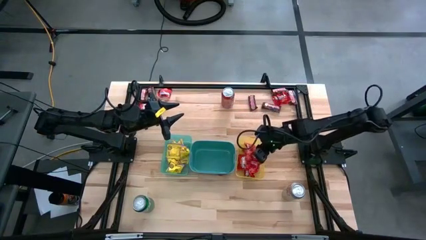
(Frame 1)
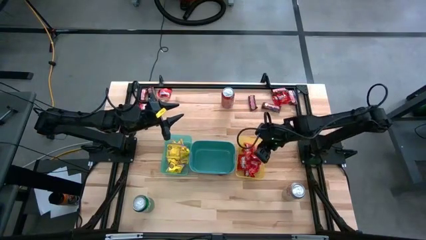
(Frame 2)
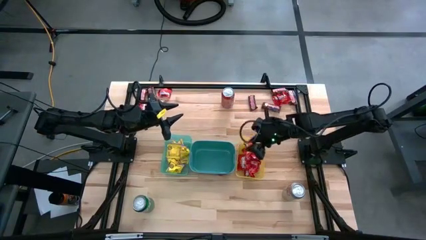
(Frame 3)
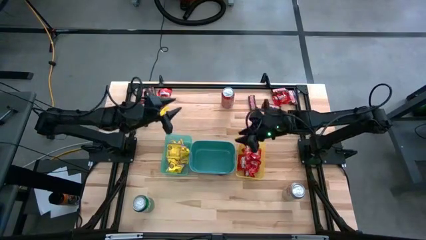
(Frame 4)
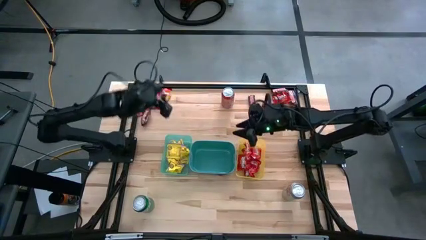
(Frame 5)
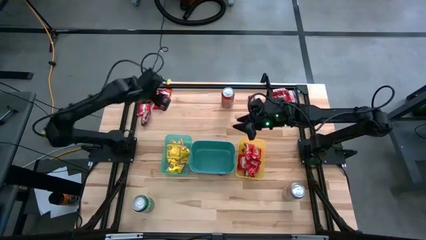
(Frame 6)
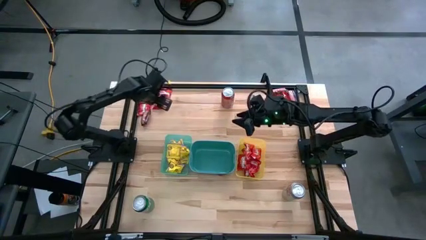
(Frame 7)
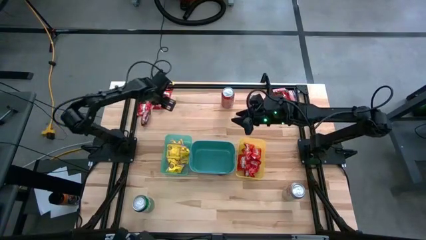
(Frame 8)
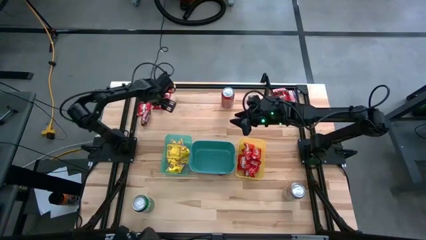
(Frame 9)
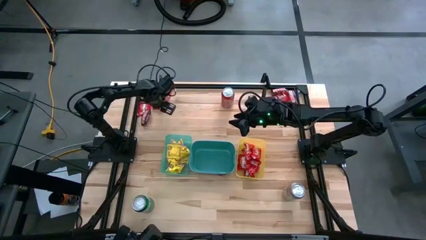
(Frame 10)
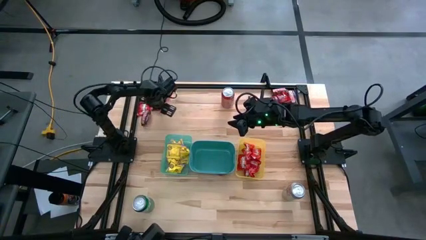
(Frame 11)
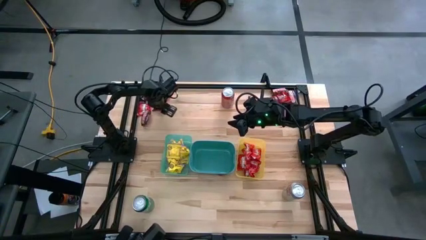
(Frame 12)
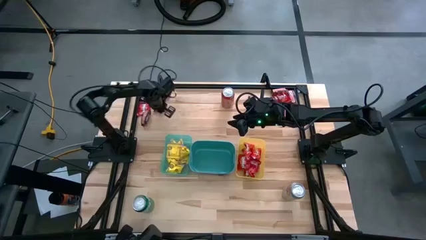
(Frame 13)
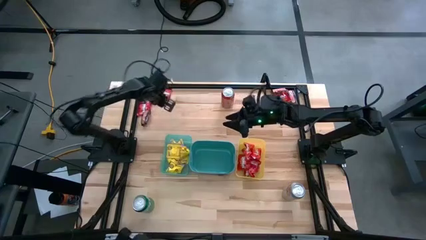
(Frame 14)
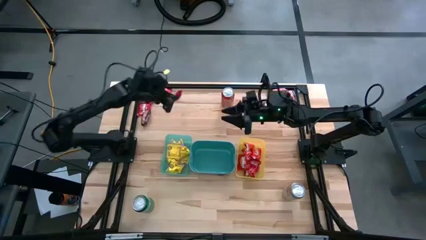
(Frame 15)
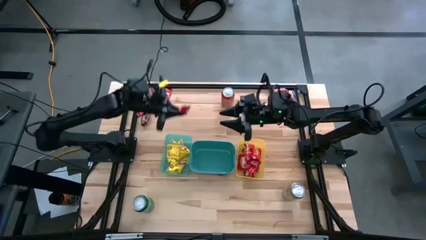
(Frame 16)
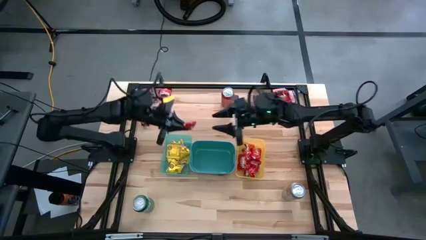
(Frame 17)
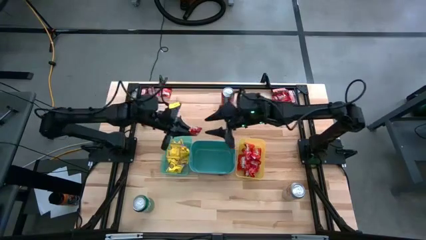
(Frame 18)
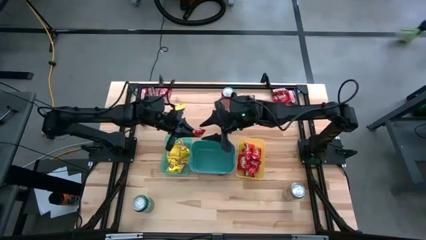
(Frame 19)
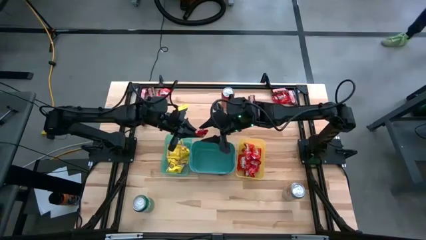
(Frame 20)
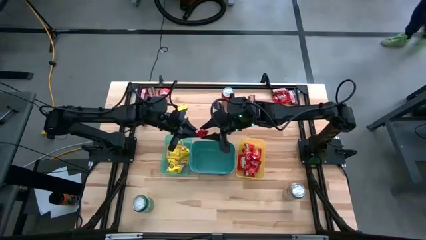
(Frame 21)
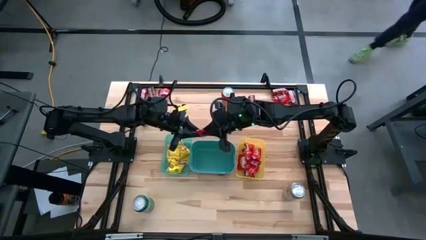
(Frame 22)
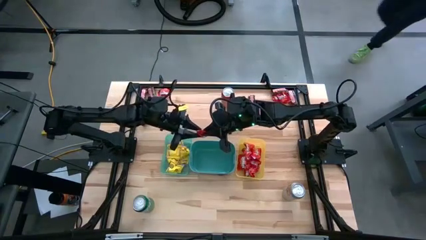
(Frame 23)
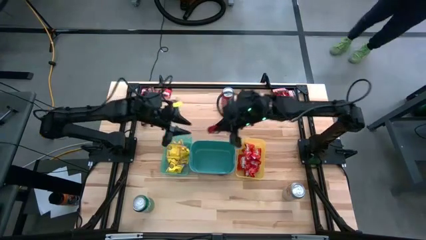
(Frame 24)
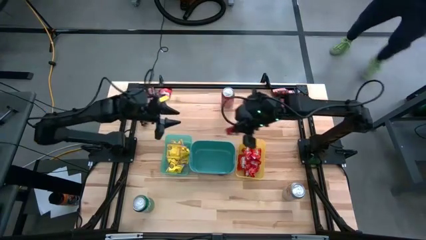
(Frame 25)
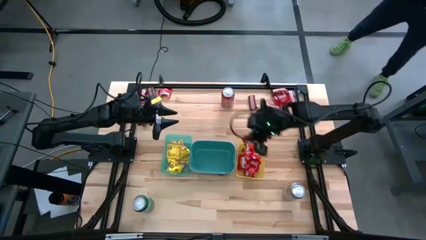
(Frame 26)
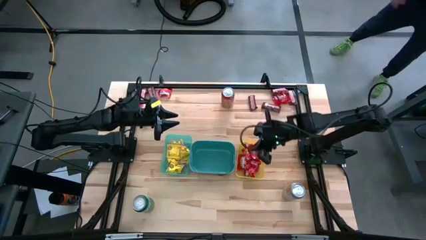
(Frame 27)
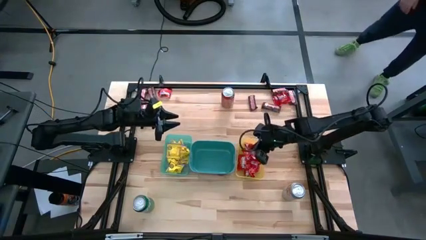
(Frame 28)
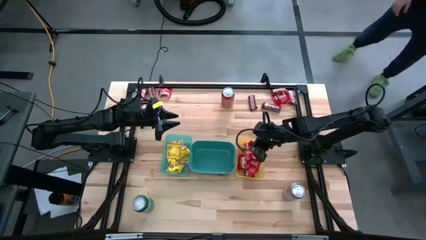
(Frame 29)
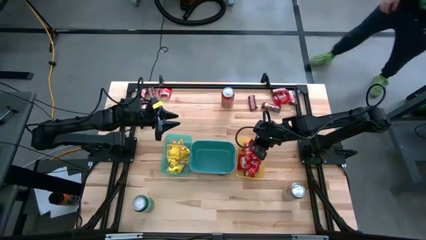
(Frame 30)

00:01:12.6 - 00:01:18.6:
Task: Sort candy
Put the red candy into the yellow bin

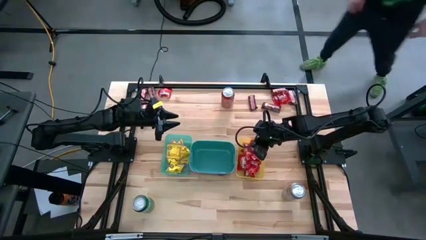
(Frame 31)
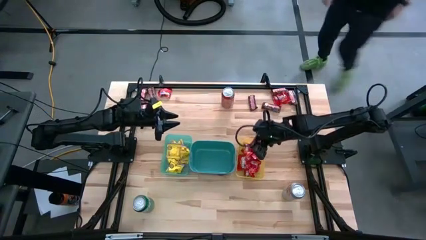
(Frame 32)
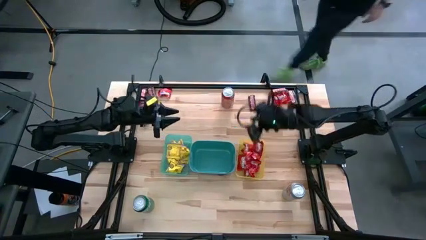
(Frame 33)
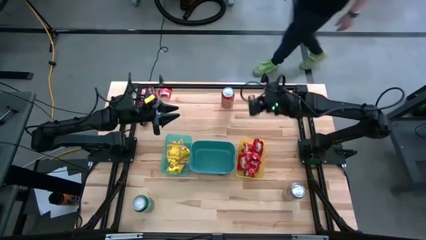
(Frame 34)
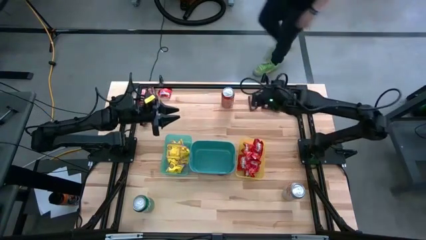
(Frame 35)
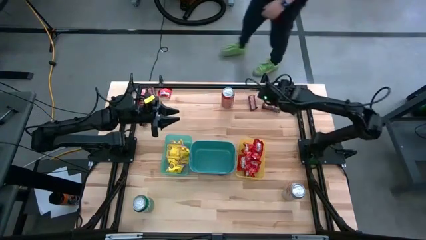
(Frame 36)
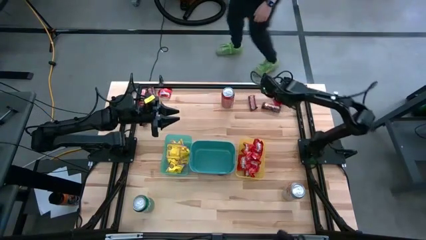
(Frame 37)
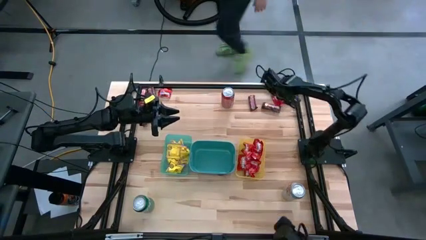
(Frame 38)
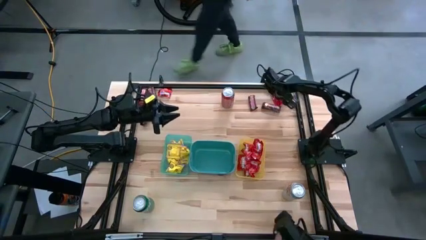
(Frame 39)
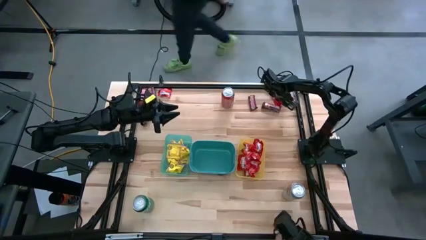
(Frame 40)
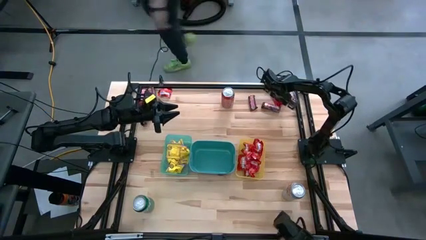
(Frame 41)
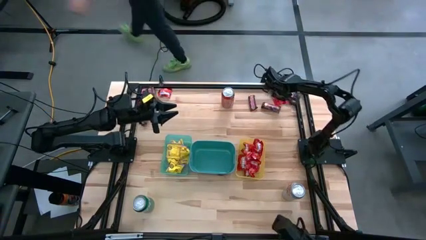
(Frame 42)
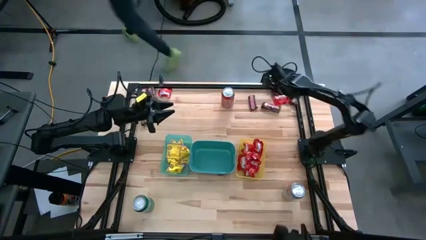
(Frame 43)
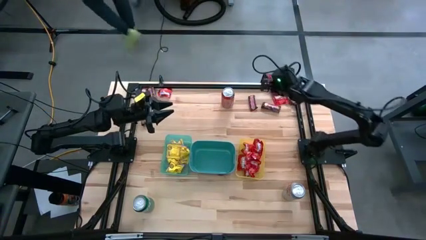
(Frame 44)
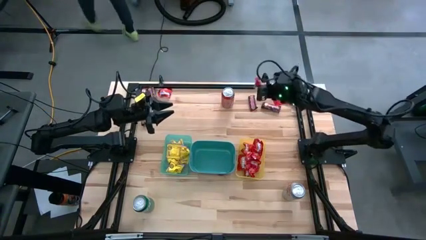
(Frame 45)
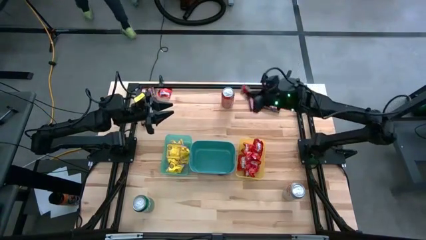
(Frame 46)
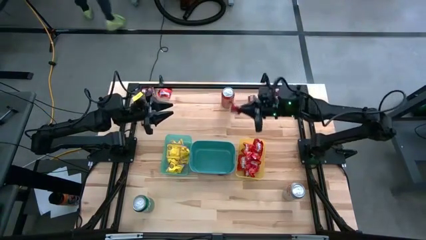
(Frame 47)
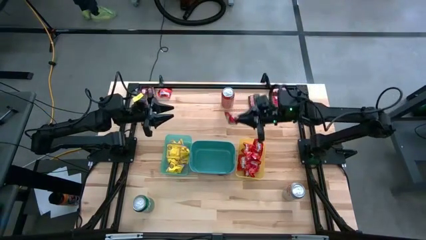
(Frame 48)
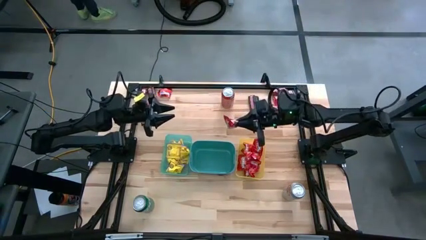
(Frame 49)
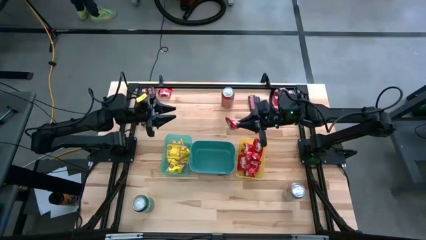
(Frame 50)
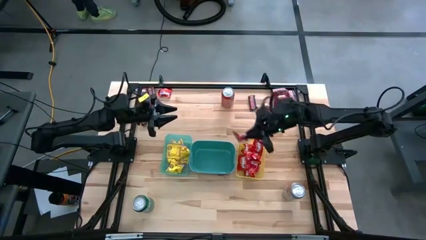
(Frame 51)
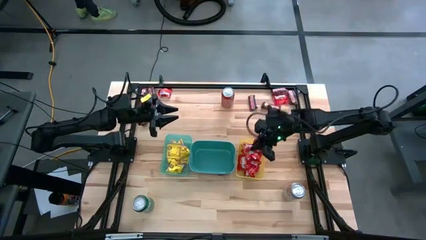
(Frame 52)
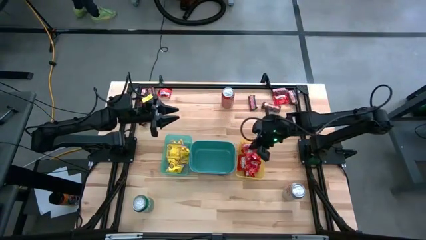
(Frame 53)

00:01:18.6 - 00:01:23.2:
Put the red candy into the yellow bin

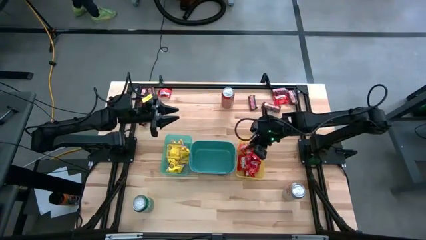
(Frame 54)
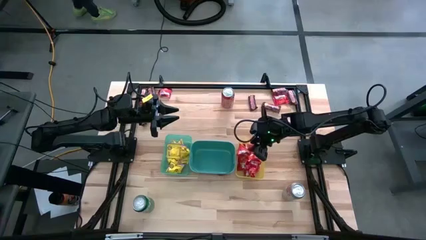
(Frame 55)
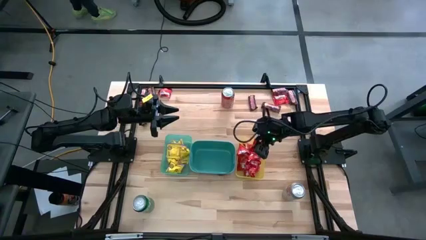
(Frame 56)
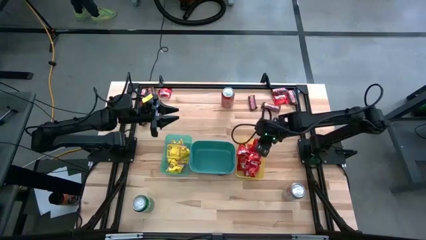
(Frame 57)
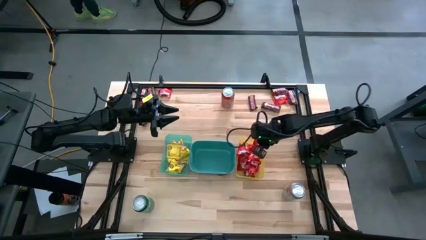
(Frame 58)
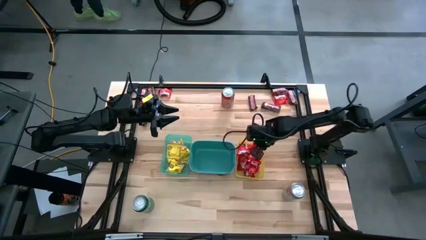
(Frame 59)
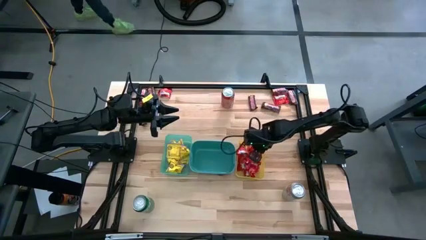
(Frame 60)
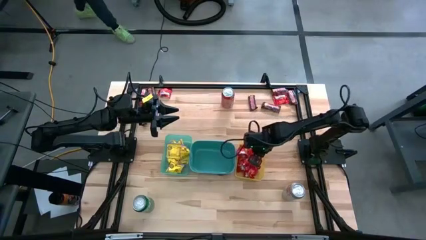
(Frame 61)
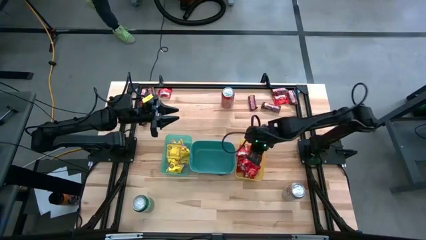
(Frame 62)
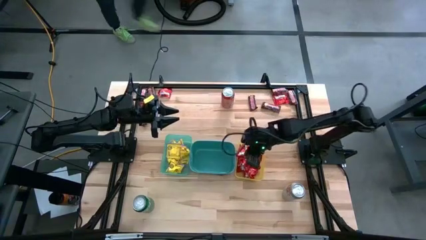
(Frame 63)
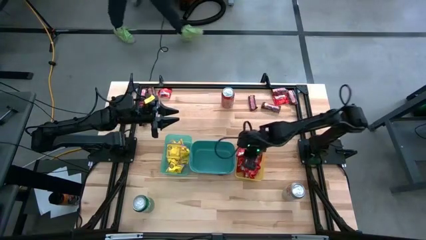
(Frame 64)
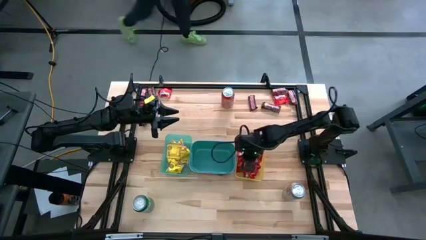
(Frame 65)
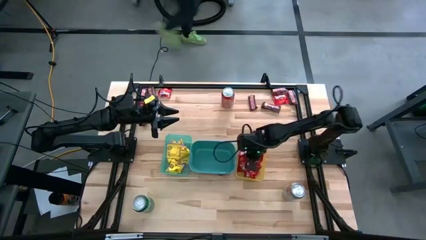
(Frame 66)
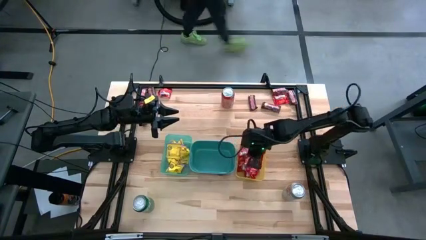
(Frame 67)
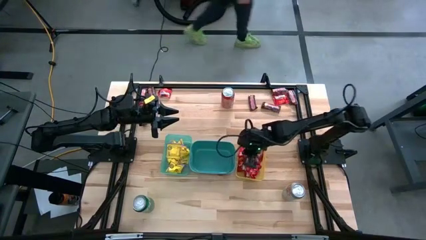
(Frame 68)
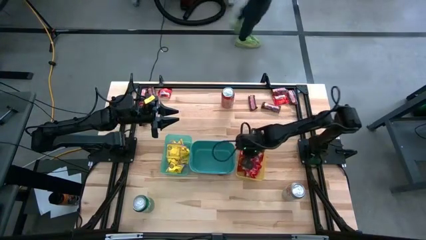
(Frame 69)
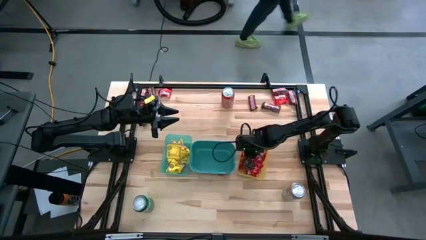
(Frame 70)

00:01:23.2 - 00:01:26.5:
Adjust the red candies in the yellow bin

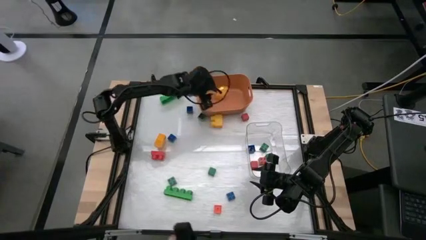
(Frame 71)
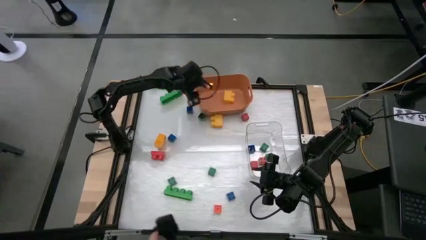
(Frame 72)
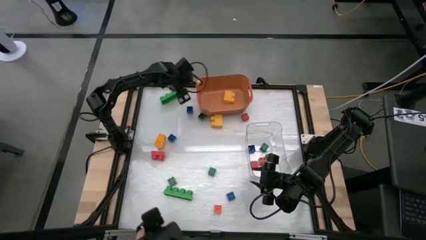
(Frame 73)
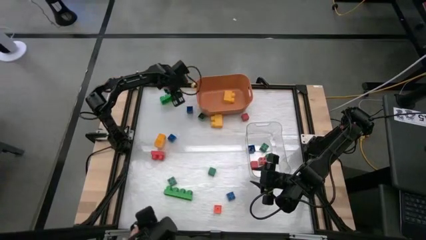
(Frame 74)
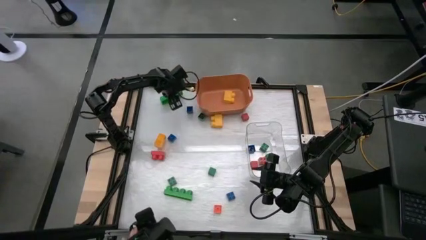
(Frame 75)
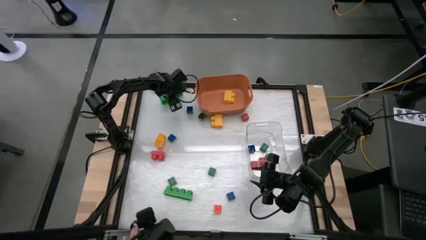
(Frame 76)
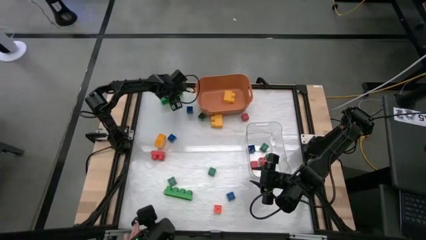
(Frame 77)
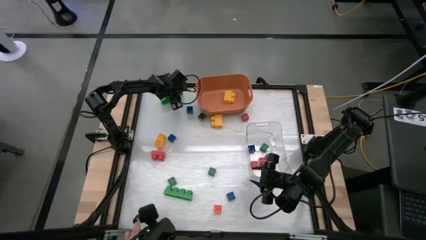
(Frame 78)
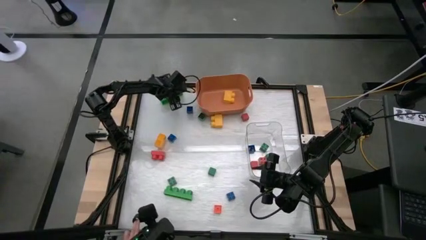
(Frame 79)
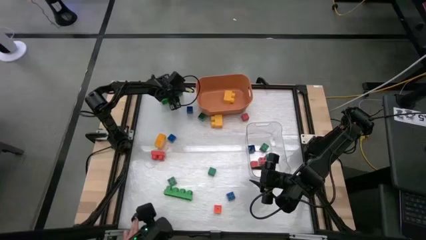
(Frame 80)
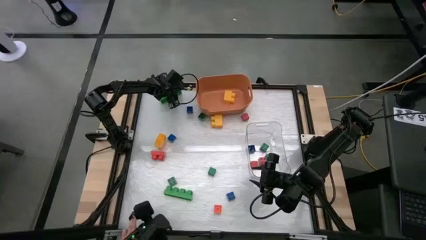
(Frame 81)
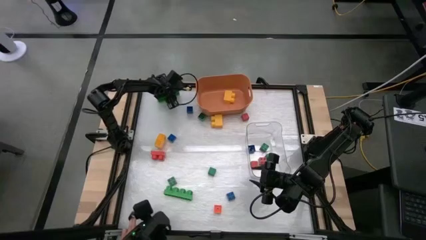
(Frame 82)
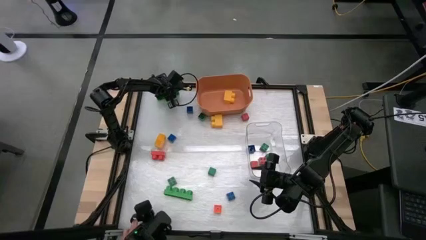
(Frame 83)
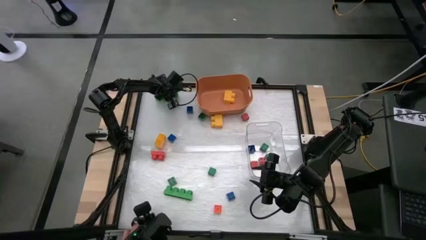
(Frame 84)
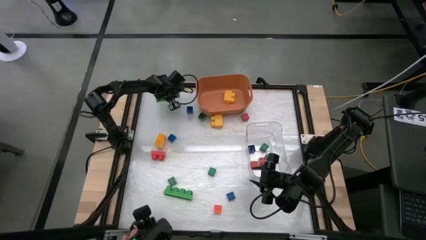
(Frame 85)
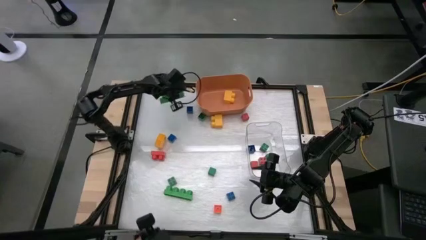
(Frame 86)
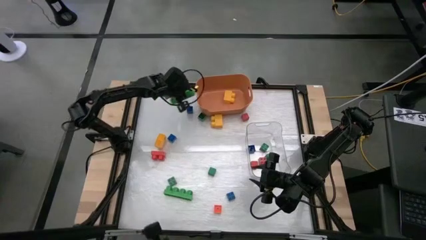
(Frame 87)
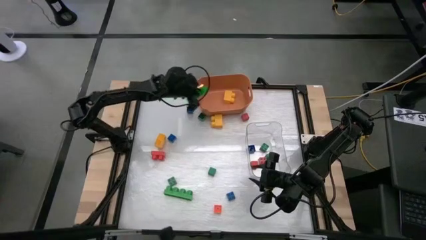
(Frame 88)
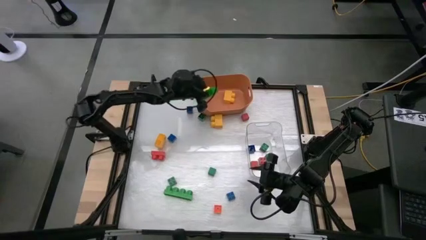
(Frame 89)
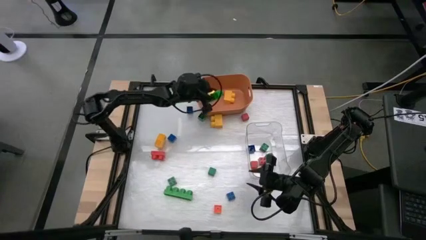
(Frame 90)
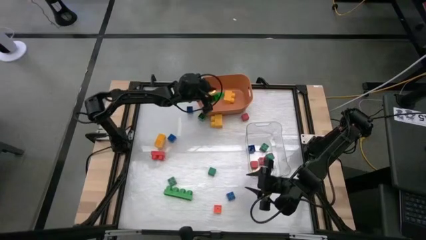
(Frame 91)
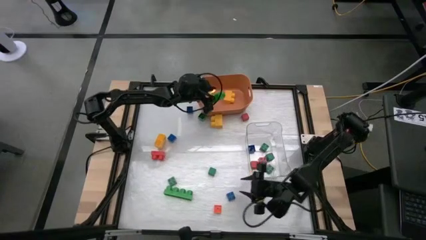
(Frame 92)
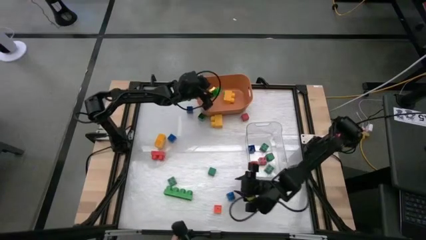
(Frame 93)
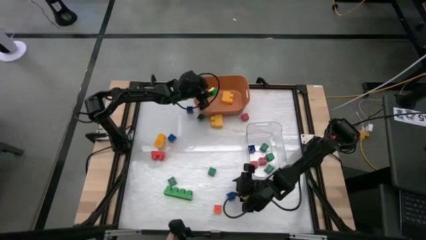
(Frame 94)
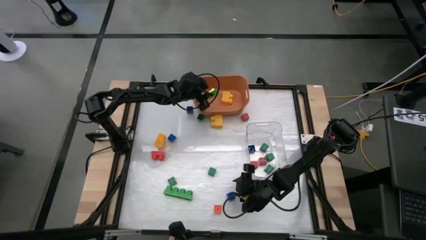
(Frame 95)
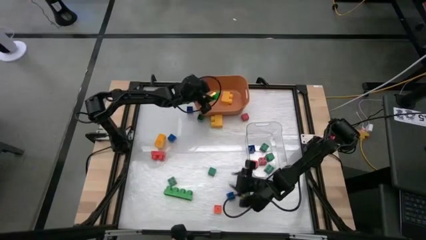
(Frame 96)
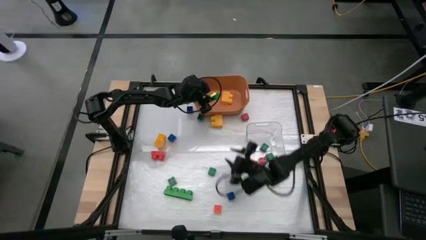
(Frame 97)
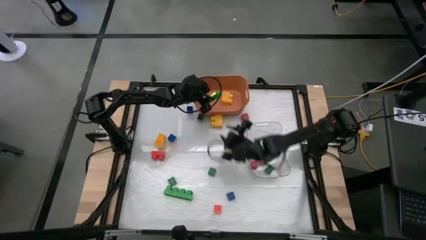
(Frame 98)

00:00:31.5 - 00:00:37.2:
Task: Sort blocks by size
Put the big green game piece into the orange bin
